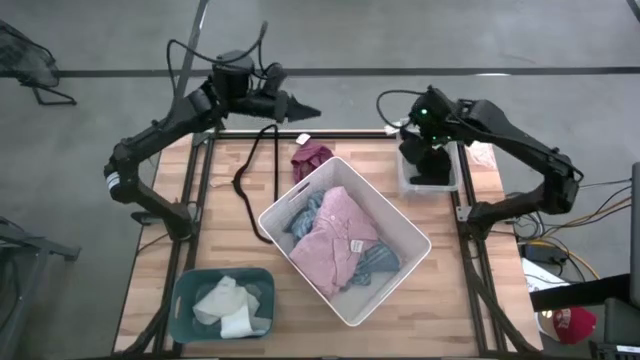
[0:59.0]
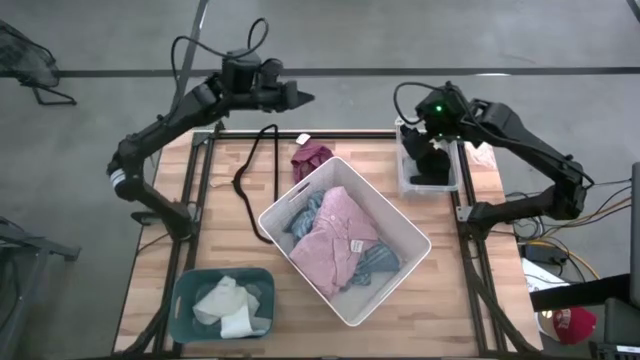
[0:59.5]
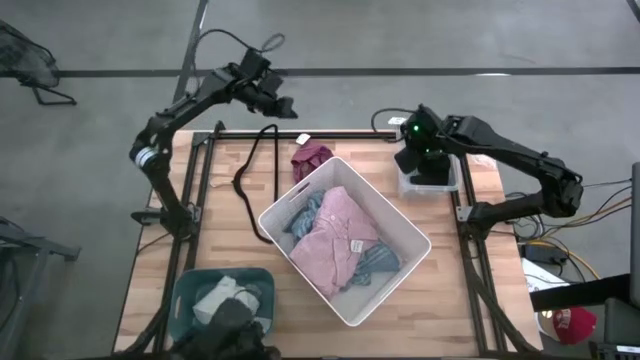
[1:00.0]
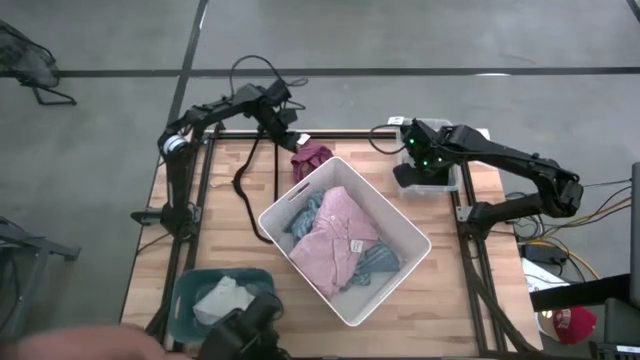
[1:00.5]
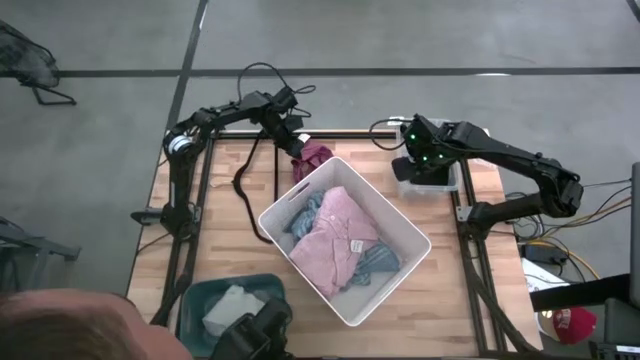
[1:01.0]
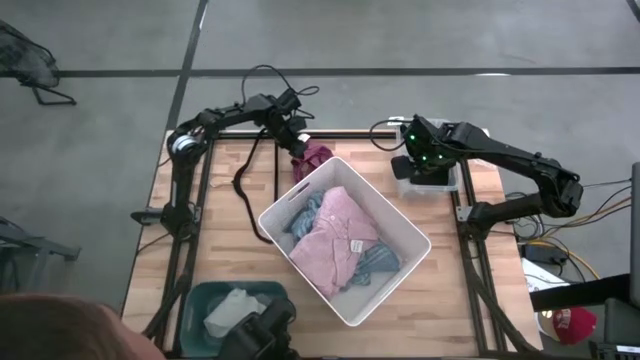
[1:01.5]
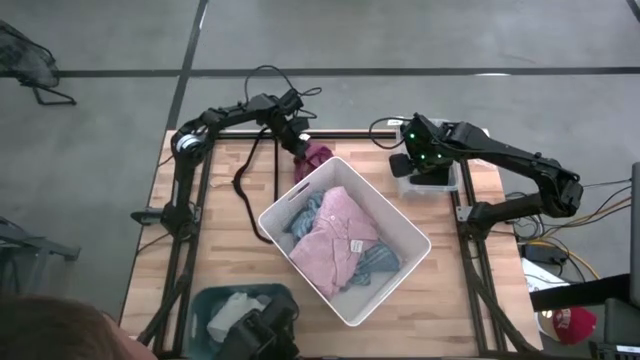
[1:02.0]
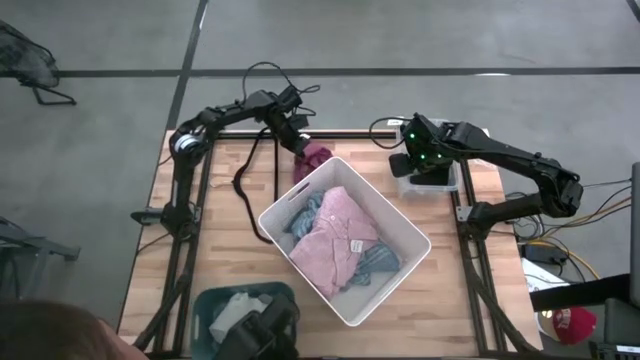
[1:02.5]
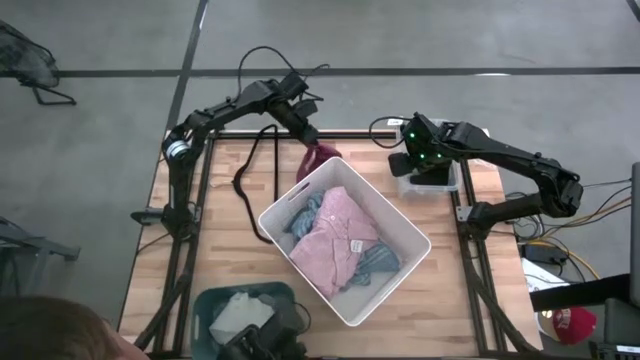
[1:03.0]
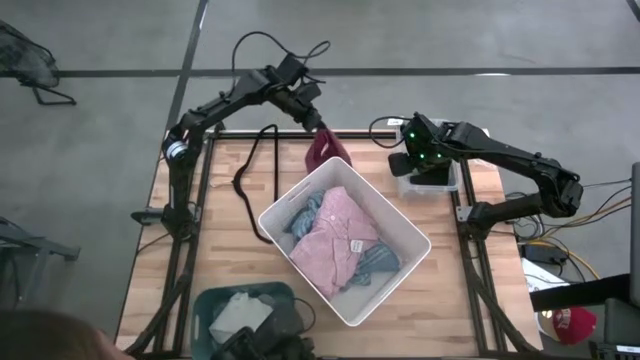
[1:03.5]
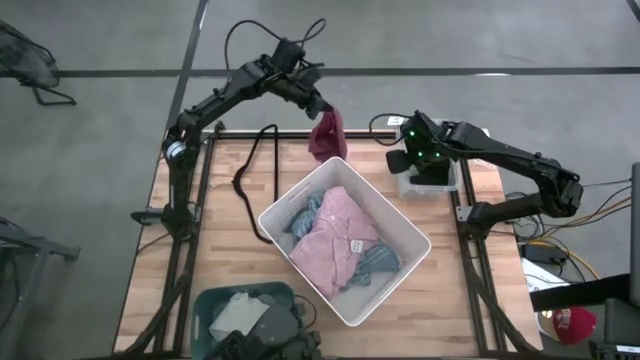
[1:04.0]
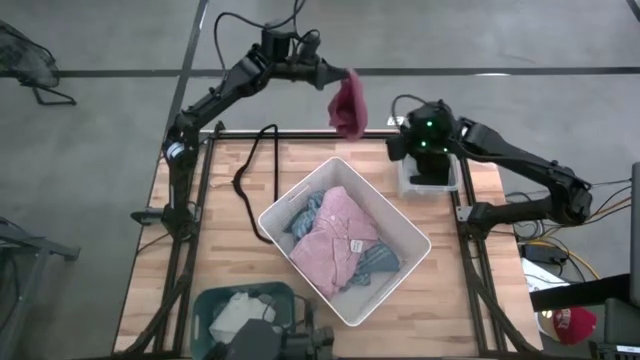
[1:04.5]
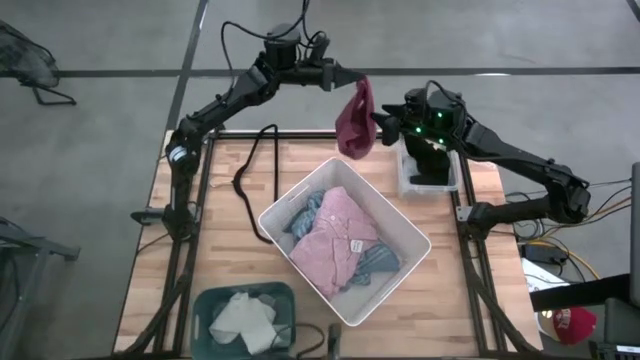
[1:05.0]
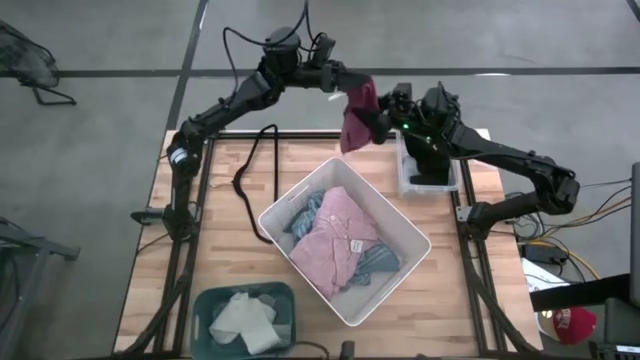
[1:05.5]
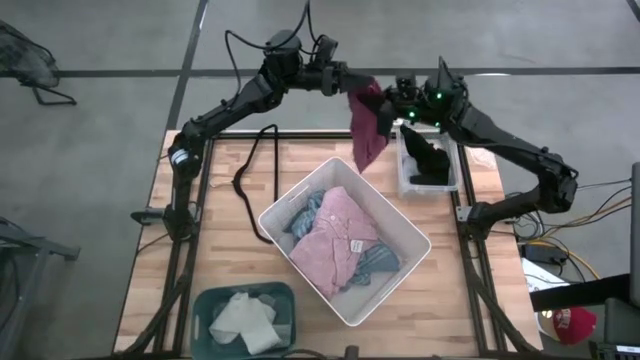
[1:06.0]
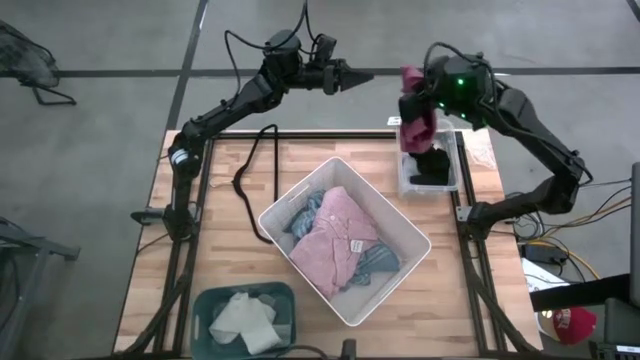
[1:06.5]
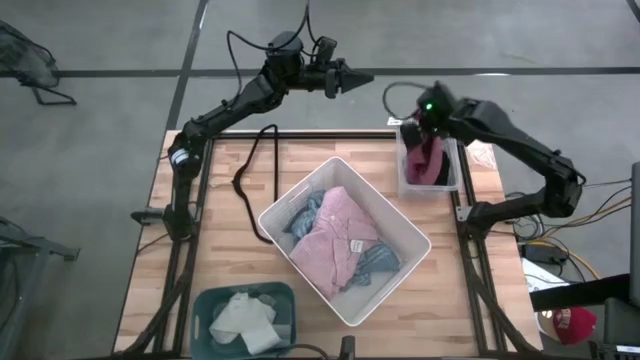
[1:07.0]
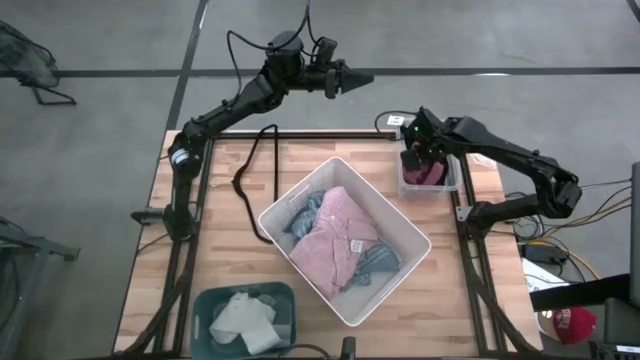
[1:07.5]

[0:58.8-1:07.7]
Task: Pick & Place Cloths
Put the red shorts into the transparent bin

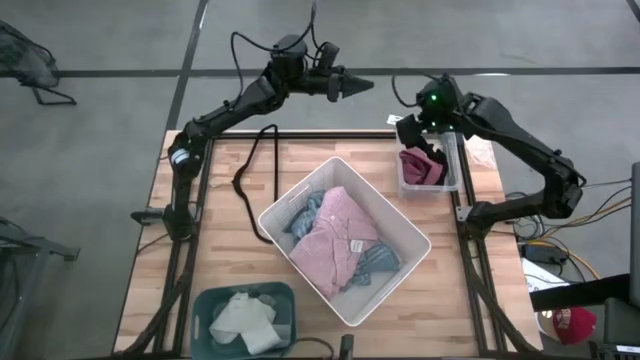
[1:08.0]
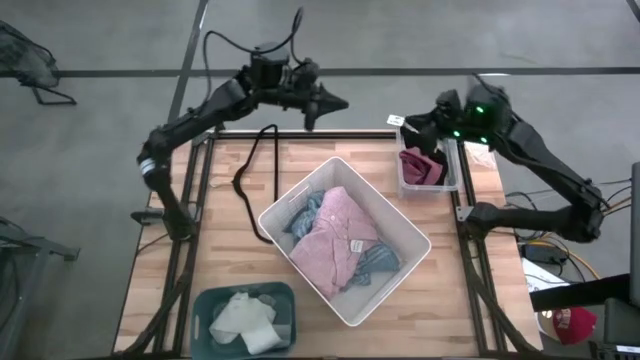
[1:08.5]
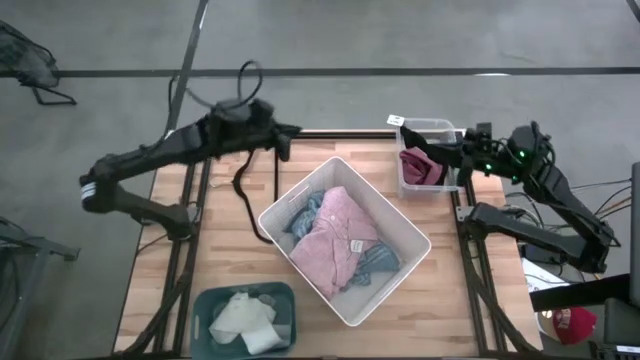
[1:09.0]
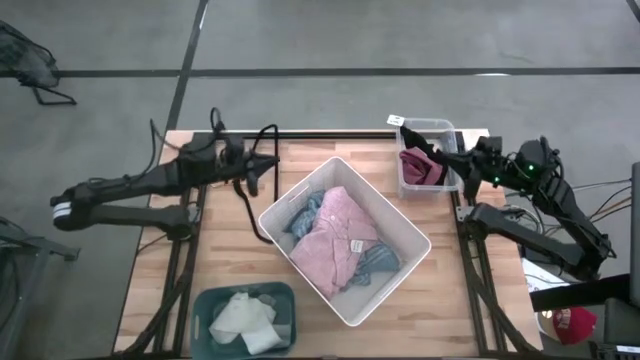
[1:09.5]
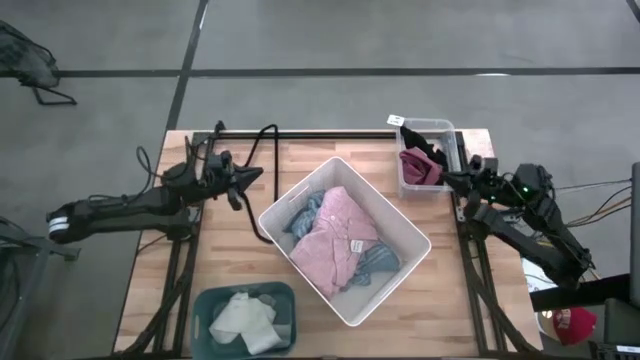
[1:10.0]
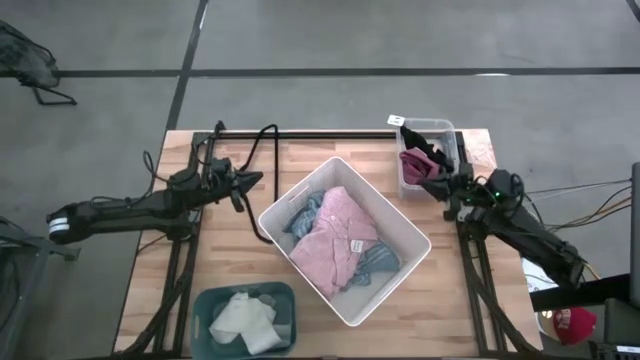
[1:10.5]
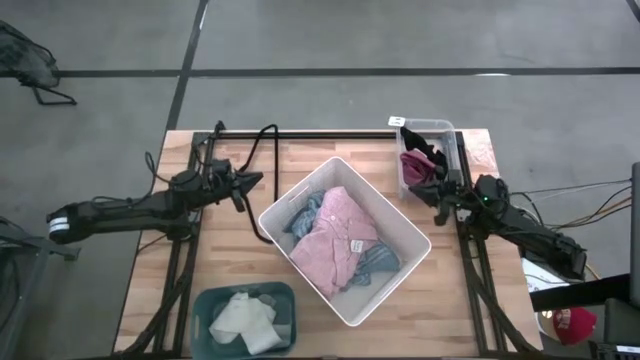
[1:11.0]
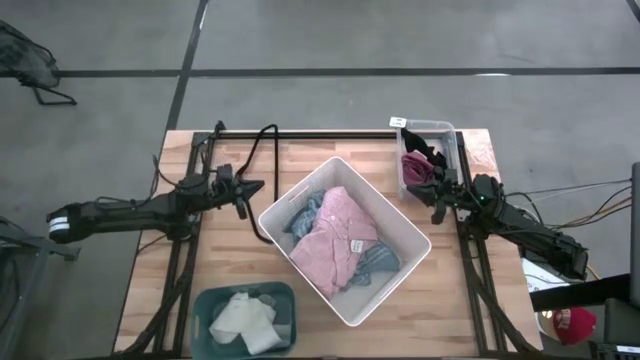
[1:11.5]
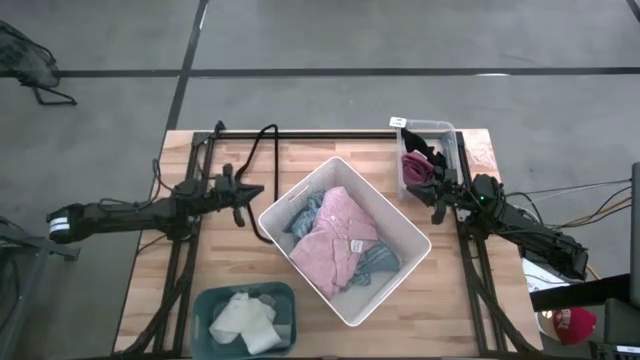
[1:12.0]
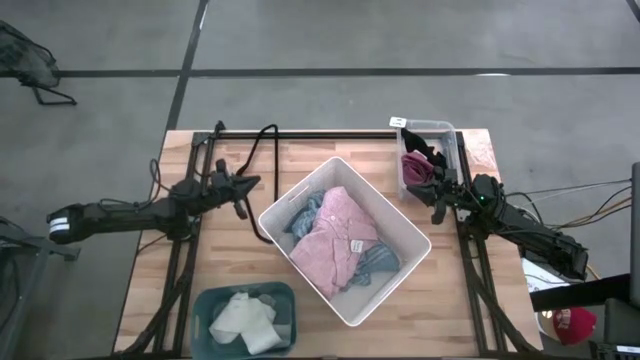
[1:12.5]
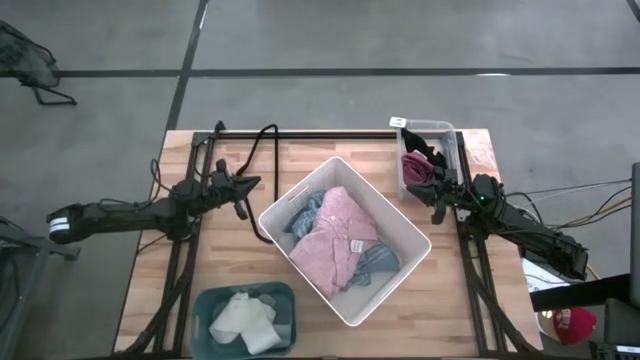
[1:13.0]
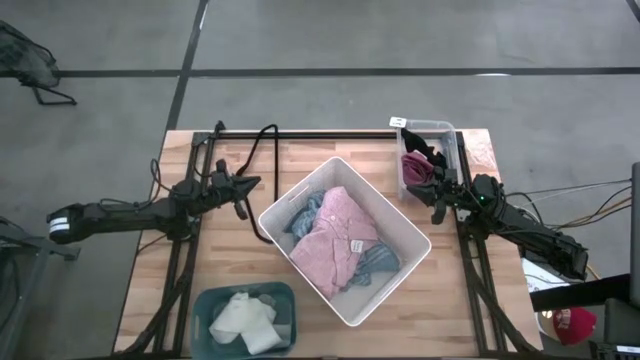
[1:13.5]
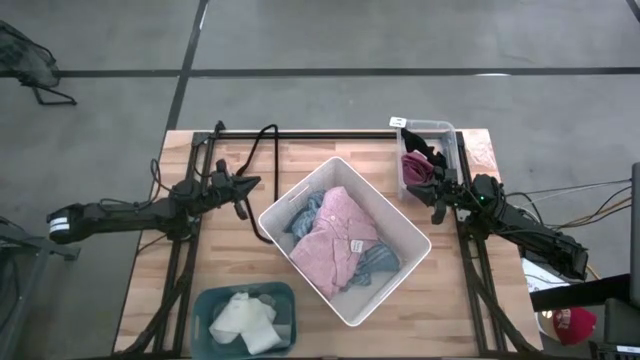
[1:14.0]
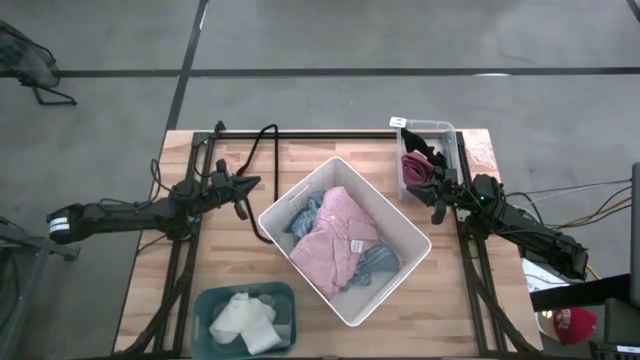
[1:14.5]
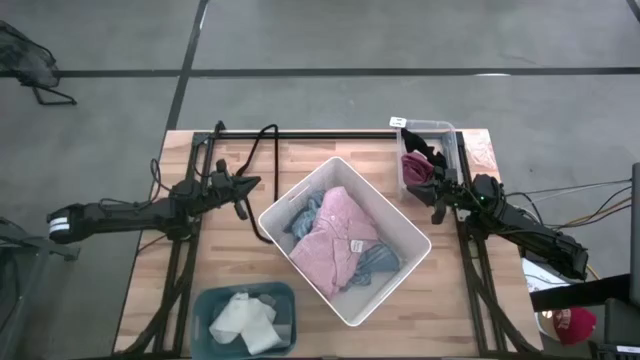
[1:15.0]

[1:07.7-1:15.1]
Return to Home Position

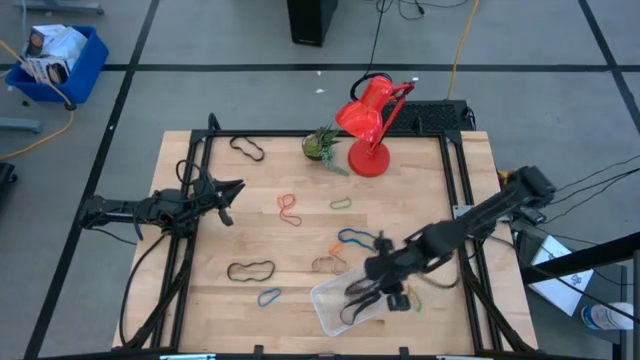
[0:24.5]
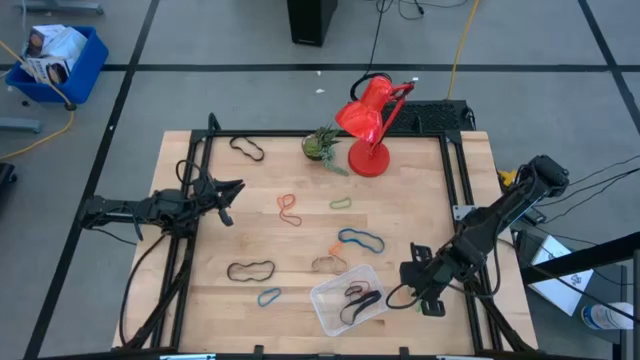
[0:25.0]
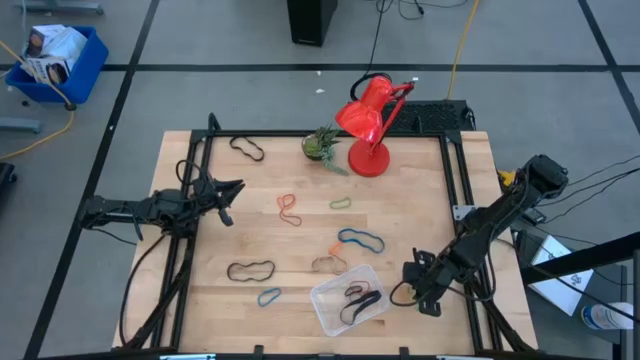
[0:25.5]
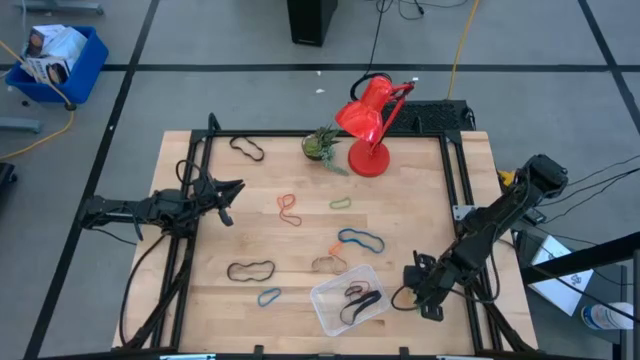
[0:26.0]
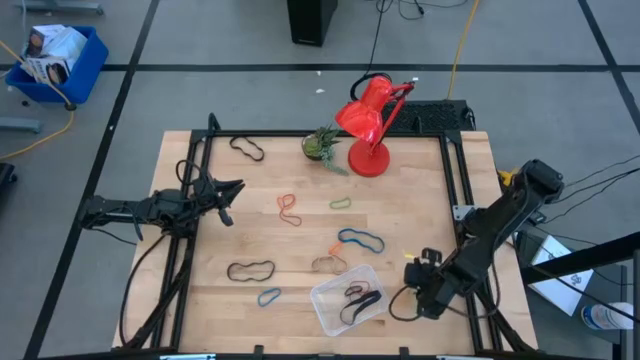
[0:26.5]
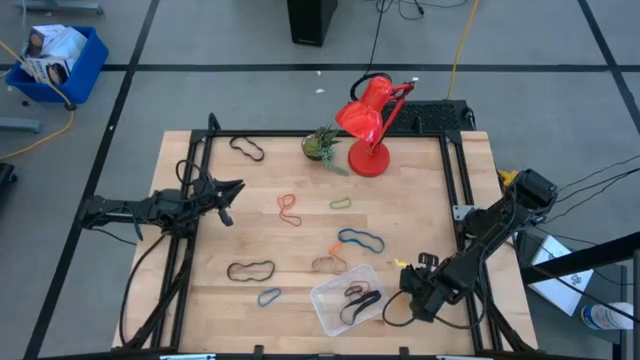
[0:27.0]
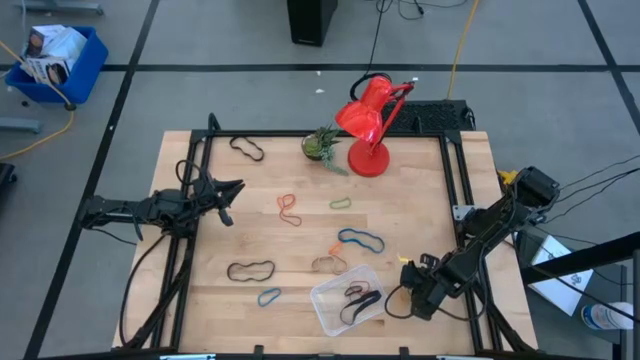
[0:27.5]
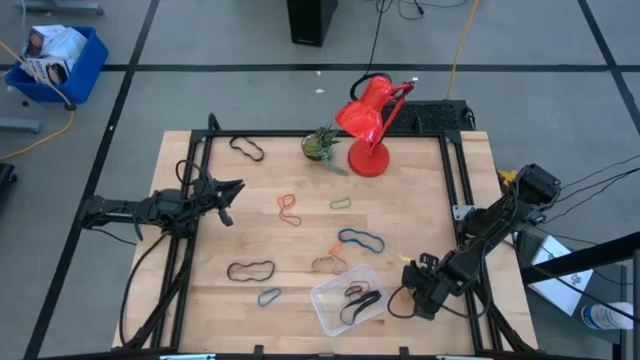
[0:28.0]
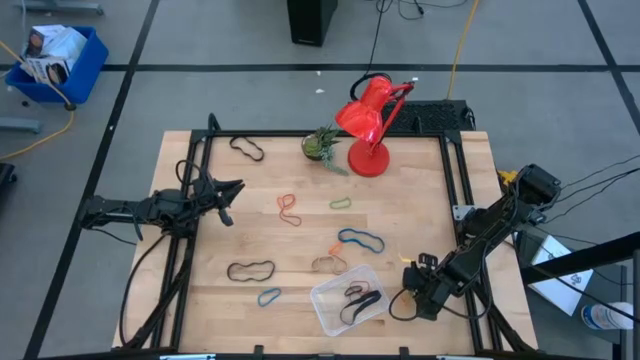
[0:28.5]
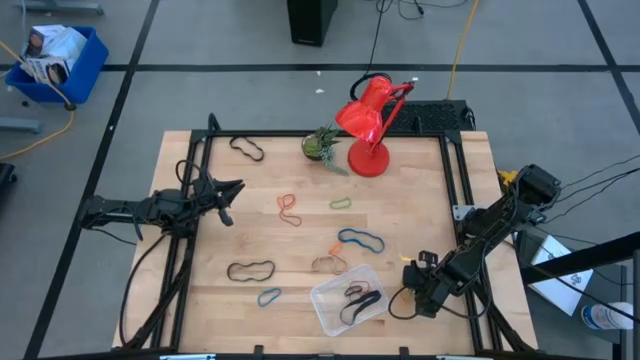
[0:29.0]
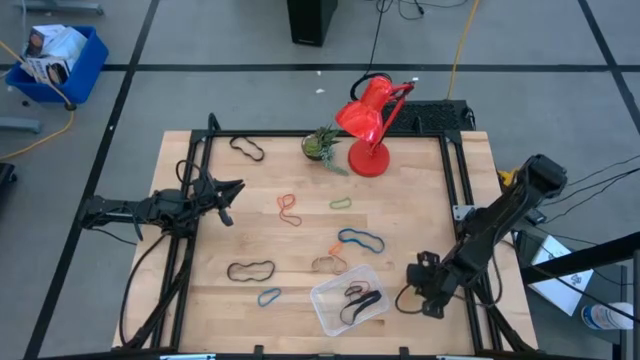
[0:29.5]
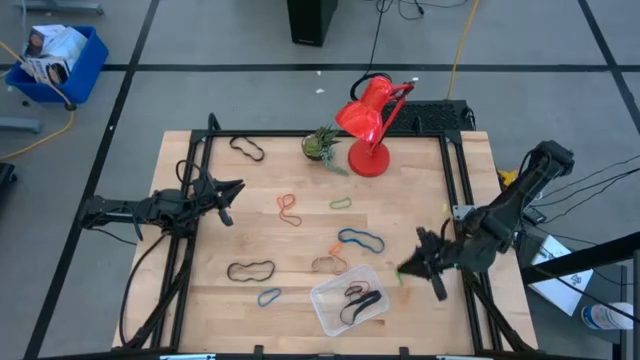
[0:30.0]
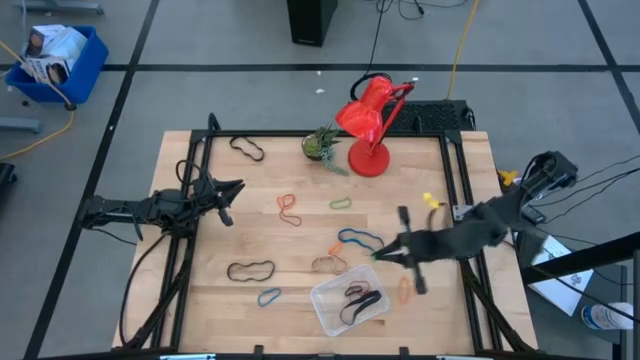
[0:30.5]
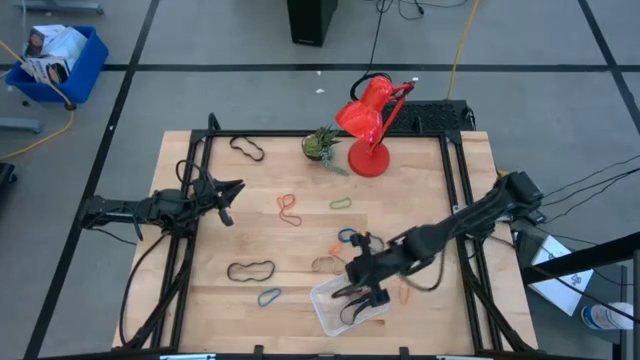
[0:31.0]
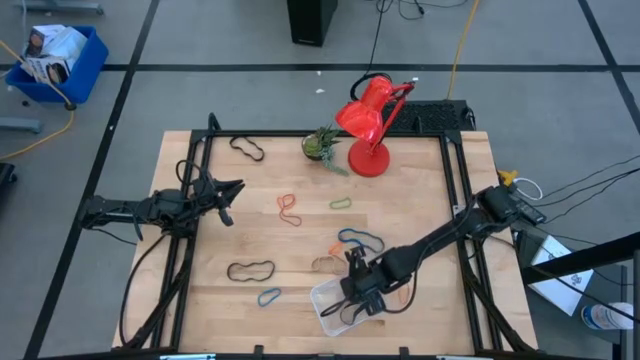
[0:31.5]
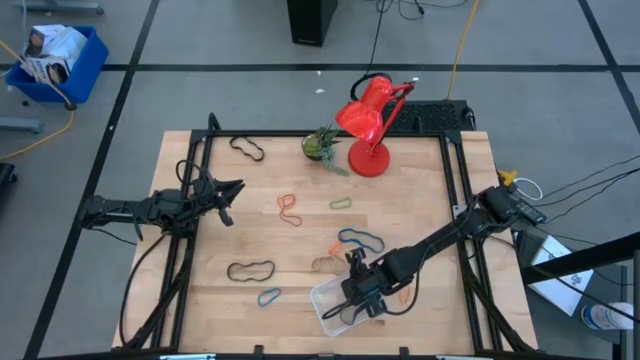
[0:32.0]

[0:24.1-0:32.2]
Task: Pick and place rubber bands into bin
Put the green rubber band into the transparent container
